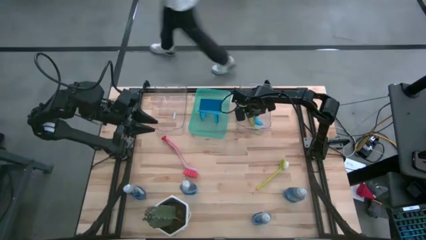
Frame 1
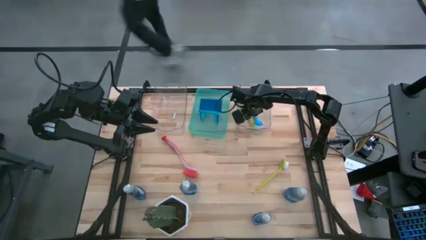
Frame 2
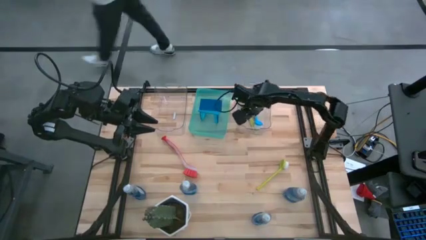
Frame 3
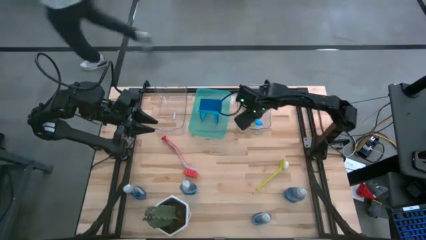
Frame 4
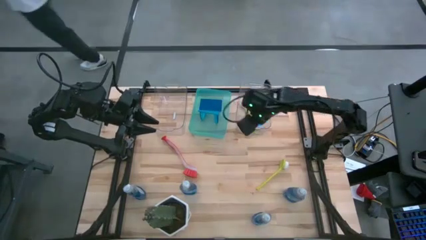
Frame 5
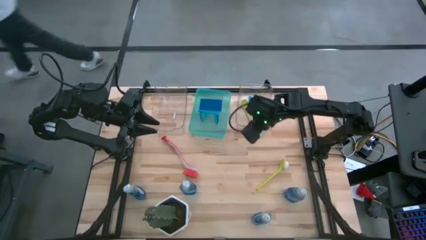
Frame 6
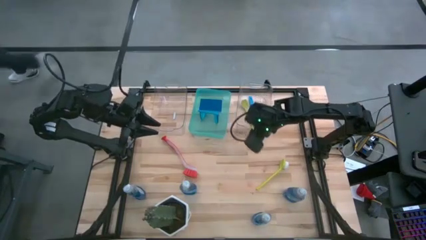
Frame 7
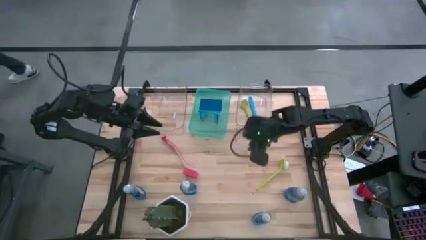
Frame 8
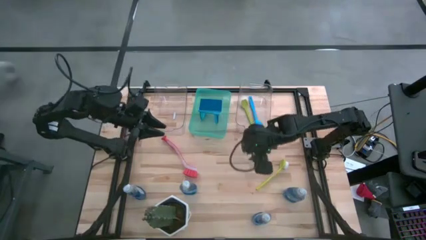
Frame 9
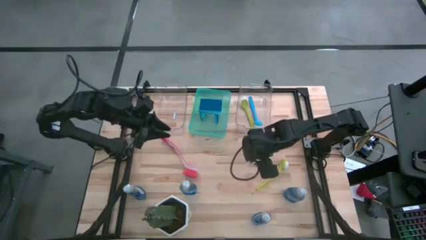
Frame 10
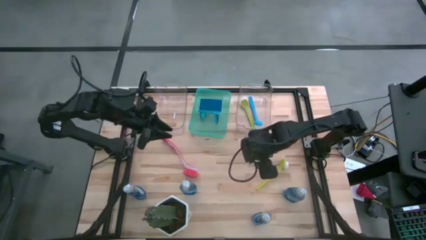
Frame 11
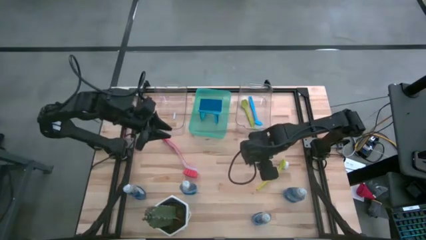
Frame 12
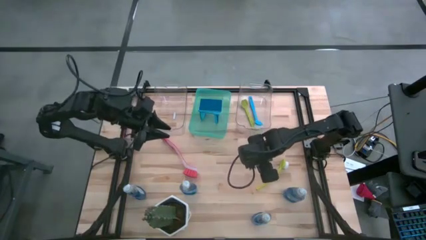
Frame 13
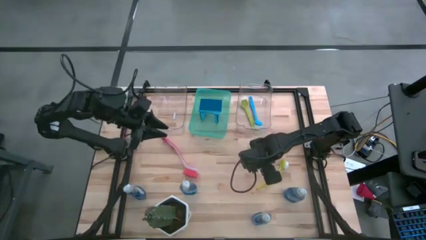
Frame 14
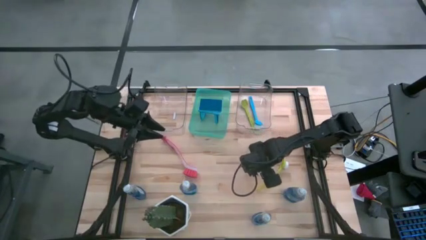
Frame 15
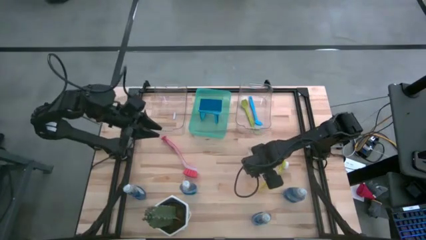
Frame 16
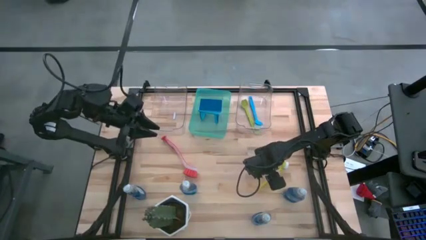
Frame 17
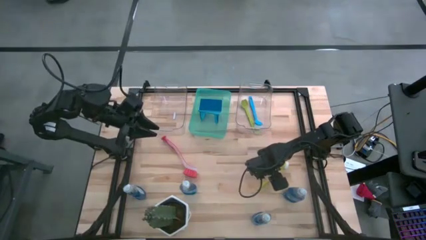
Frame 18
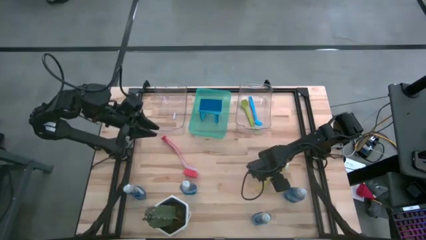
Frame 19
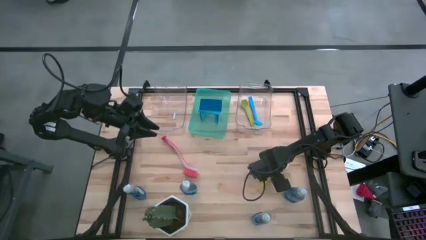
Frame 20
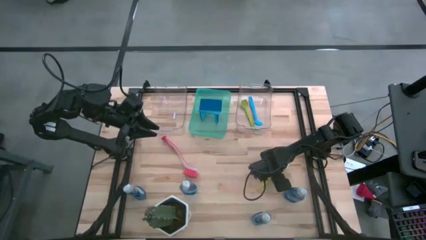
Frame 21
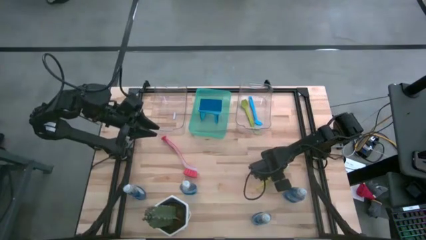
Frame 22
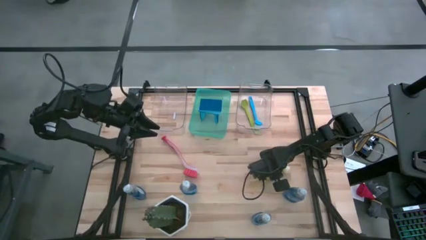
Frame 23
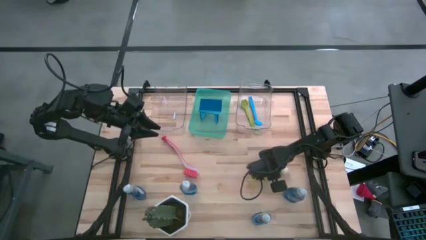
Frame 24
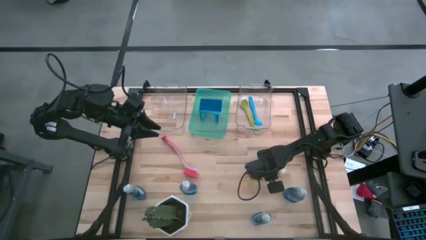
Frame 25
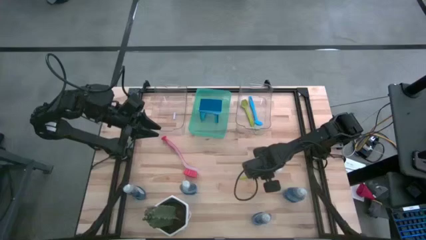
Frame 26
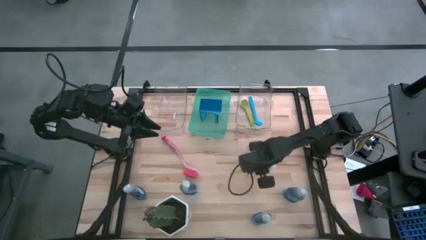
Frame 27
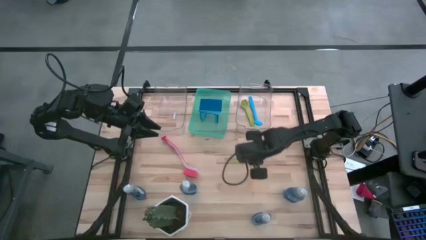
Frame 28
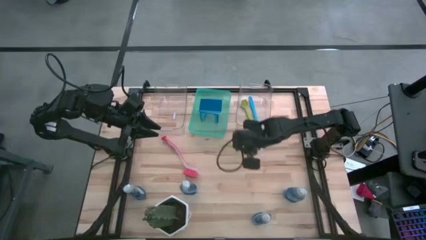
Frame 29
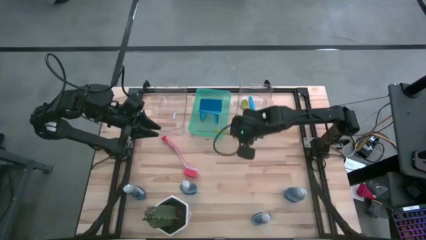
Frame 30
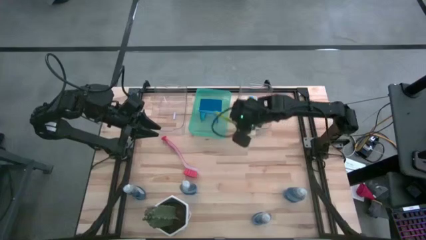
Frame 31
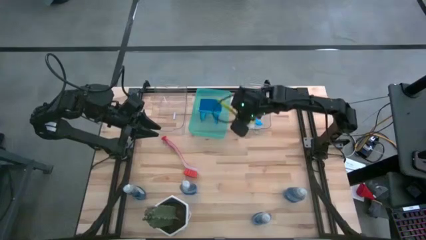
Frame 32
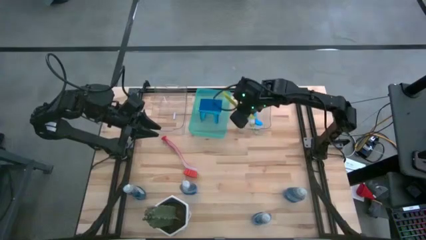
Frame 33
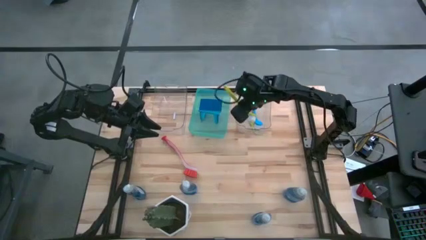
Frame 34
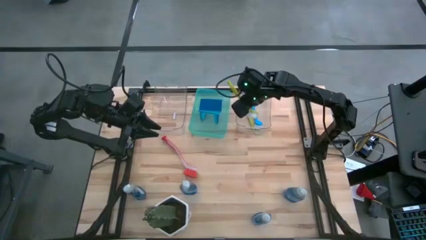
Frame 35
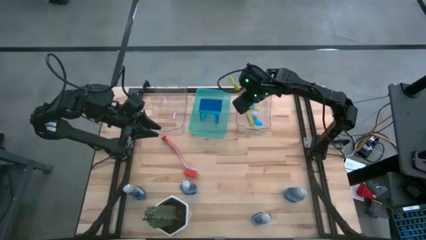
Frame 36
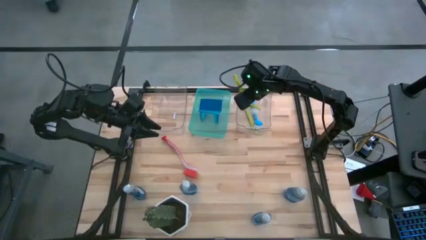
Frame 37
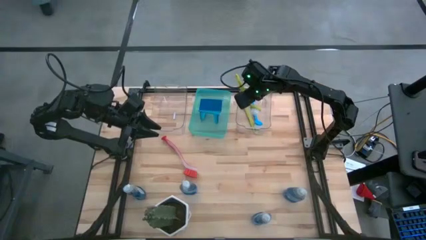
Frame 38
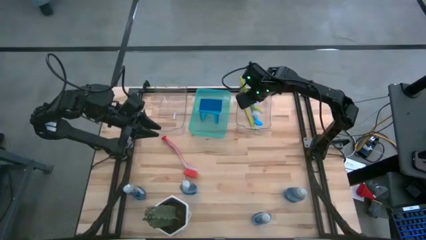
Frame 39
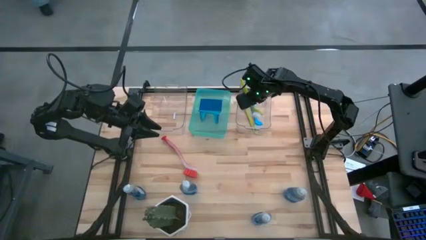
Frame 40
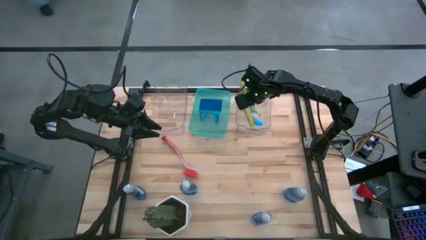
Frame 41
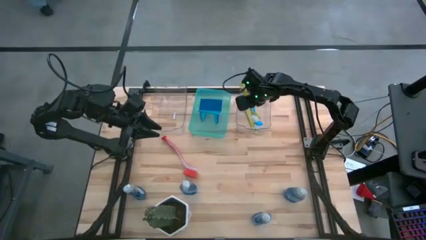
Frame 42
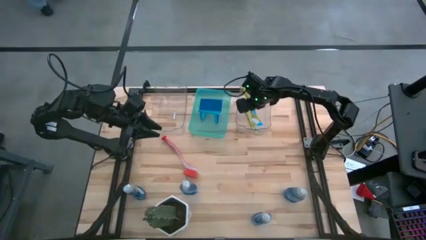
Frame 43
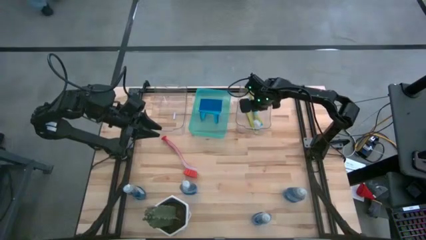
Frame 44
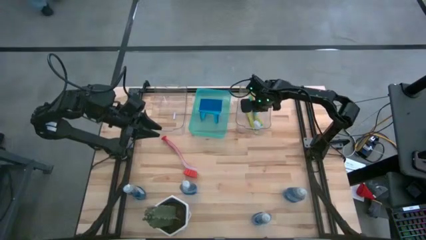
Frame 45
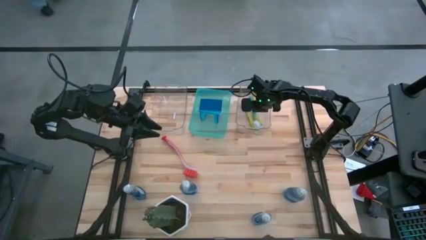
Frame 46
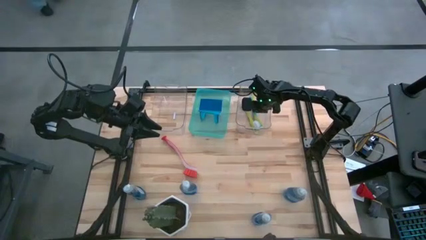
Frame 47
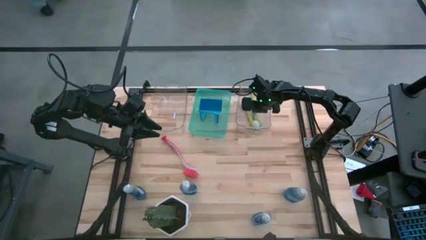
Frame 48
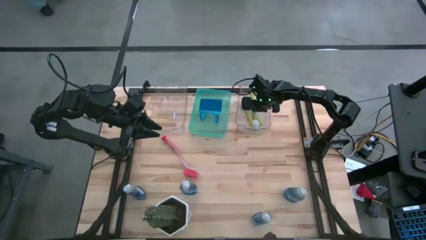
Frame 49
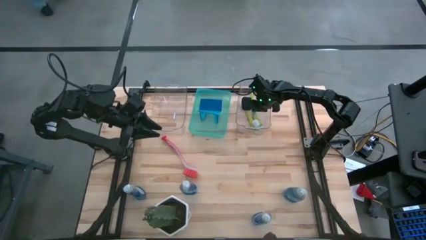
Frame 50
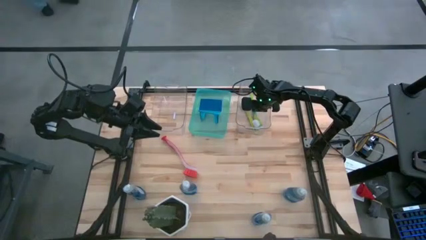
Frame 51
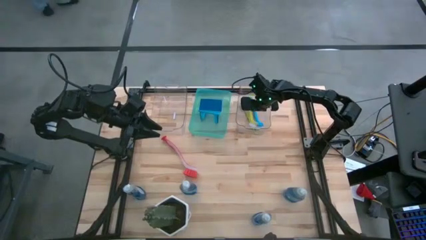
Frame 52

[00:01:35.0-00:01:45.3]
Task: Pick & Place Kitchen Sink Supplies
Put the light green dish brush into the right transparent bin

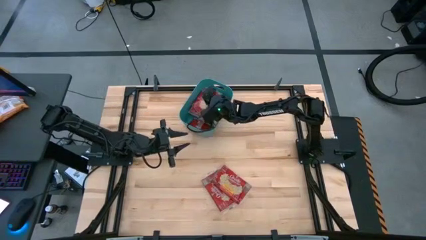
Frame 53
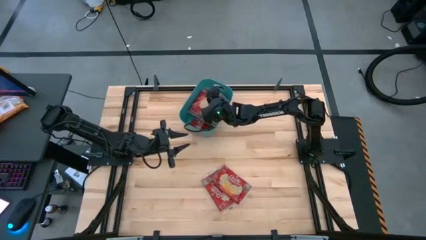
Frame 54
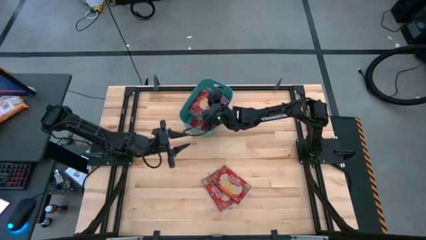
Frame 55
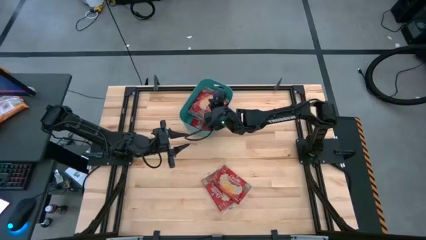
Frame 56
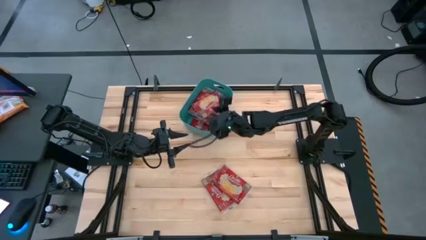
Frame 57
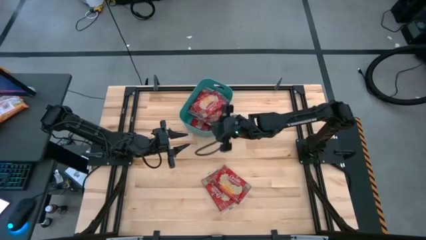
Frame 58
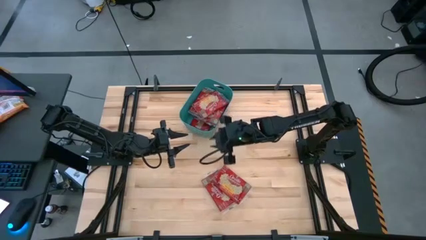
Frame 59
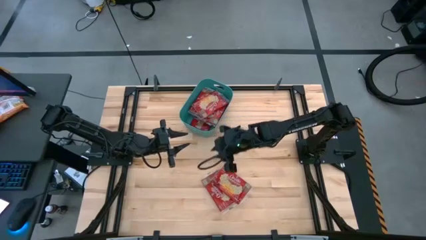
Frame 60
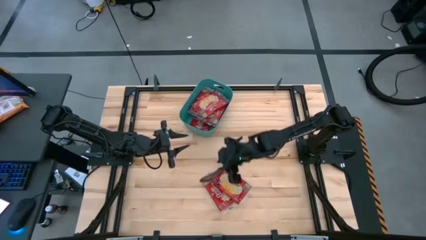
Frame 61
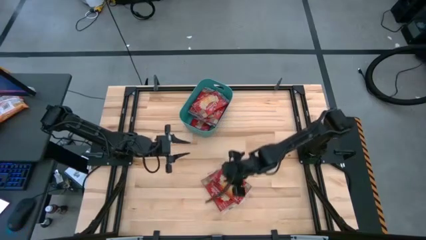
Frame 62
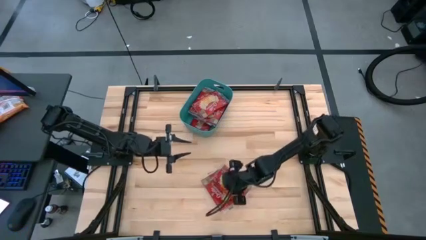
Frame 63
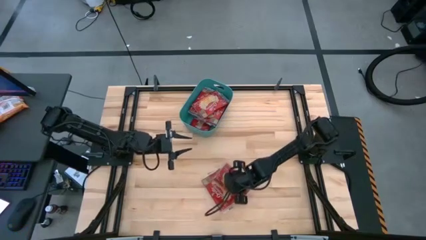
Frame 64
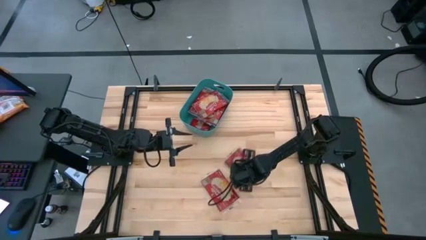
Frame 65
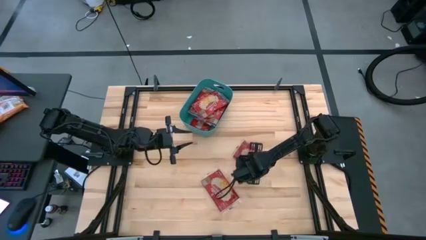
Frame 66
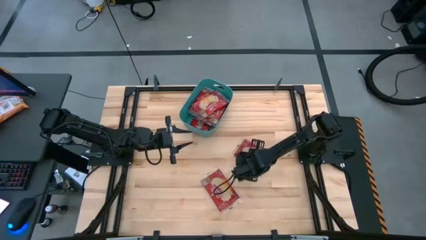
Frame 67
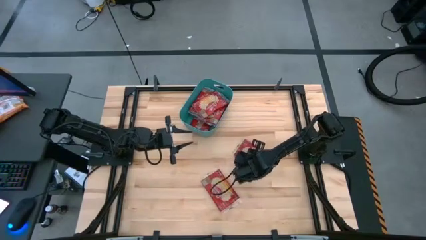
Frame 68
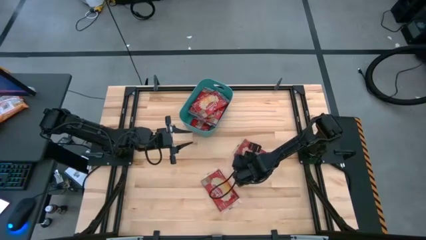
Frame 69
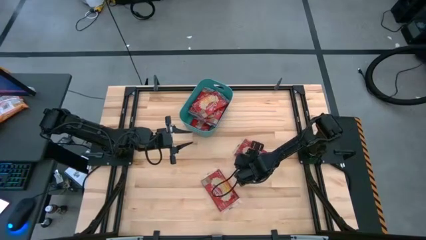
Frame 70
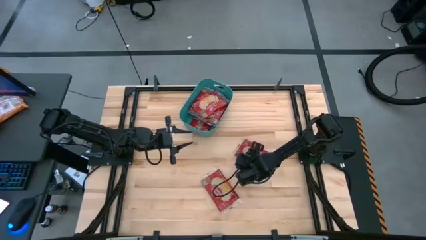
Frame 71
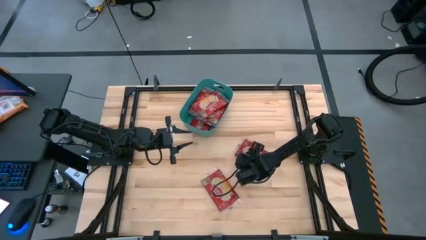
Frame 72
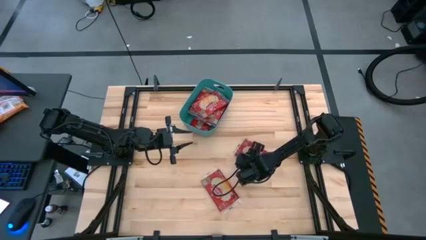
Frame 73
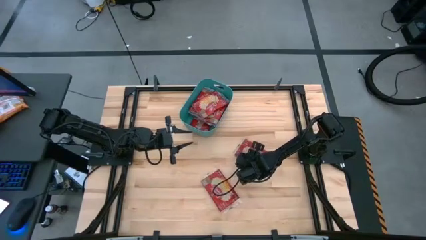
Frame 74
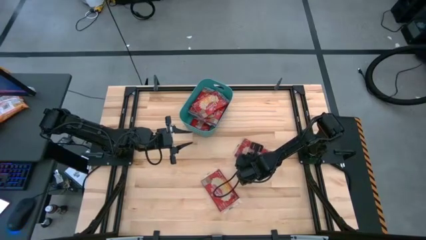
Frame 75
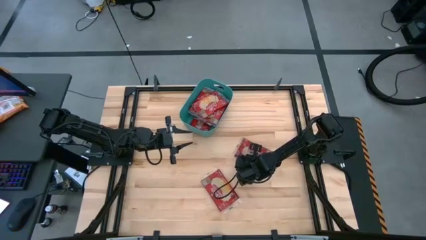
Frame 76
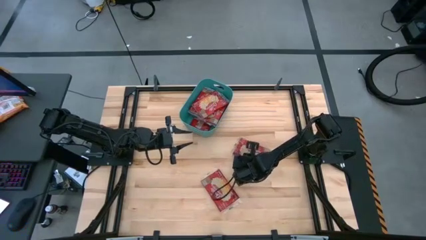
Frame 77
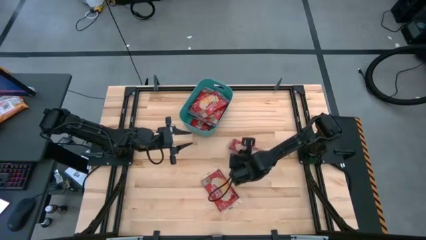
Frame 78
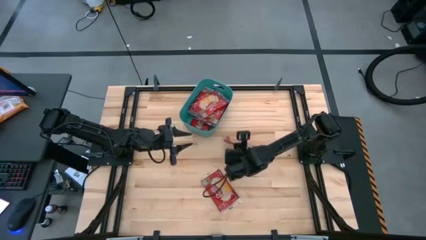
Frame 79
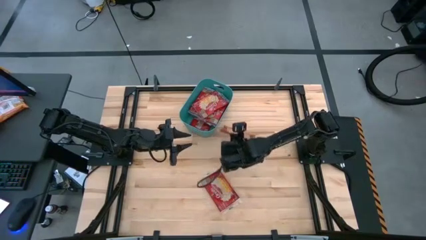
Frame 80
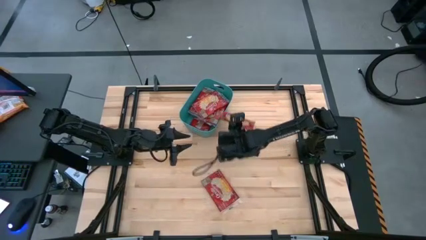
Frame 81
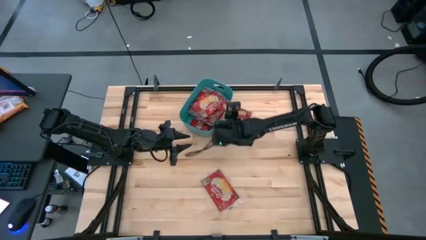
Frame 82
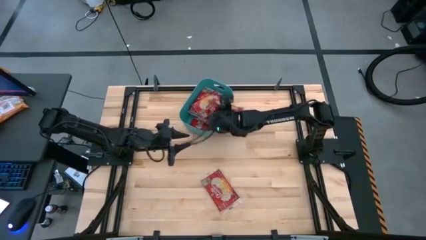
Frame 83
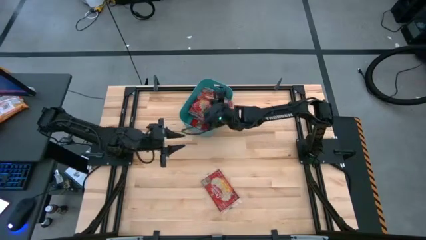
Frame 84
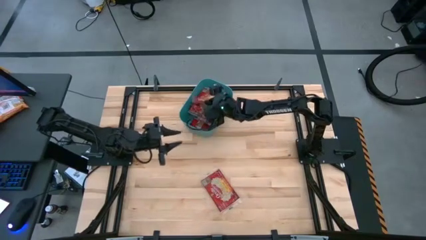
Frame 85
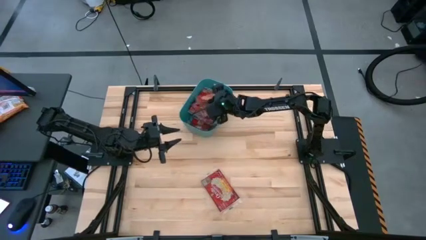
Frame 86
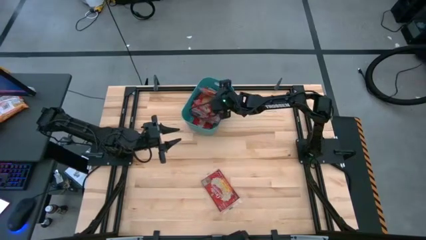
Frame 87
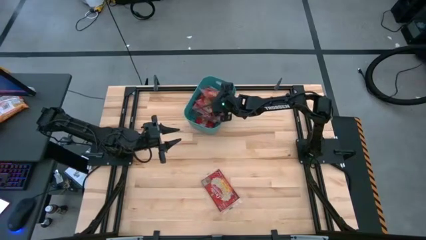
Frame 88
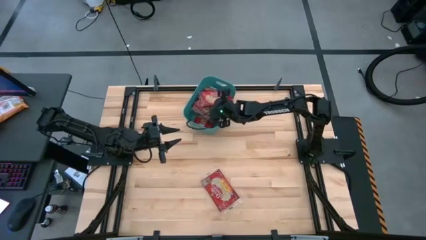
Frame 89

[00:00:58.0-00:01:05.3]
Task: Sort popcorn bags into baskets
Put the popcorn bag into the green bin
